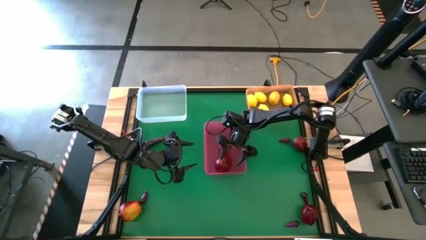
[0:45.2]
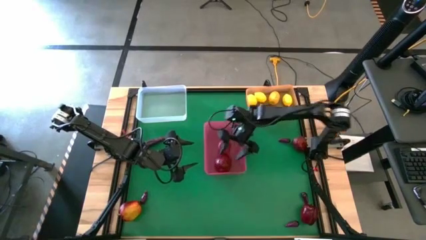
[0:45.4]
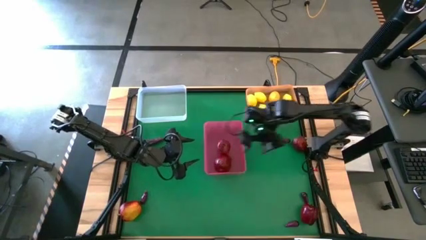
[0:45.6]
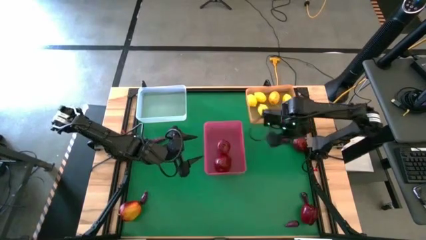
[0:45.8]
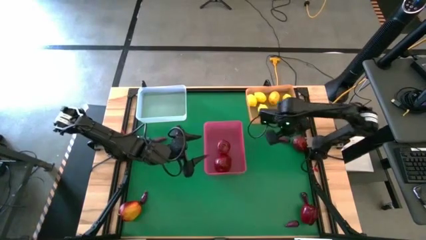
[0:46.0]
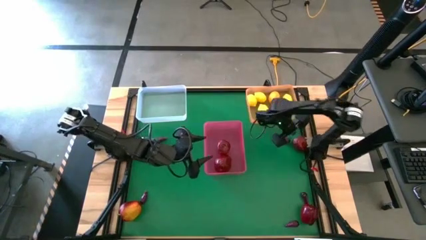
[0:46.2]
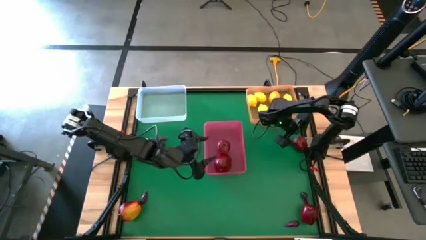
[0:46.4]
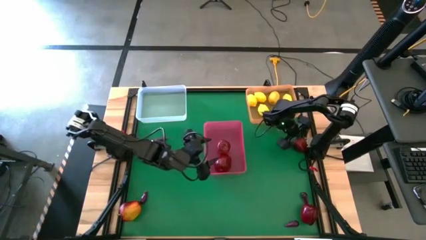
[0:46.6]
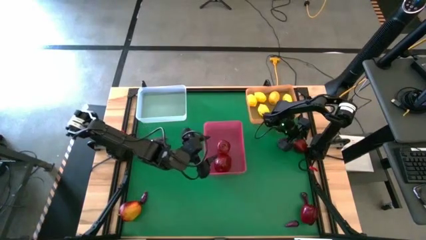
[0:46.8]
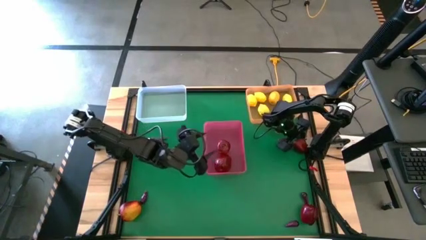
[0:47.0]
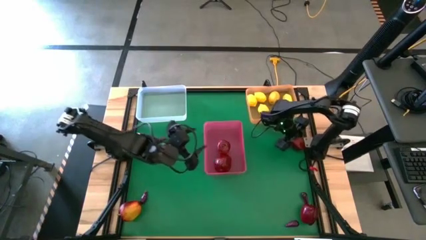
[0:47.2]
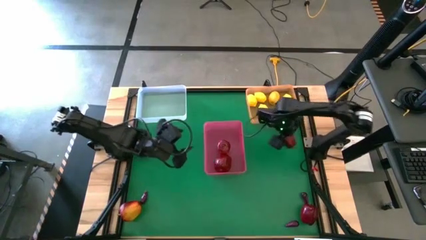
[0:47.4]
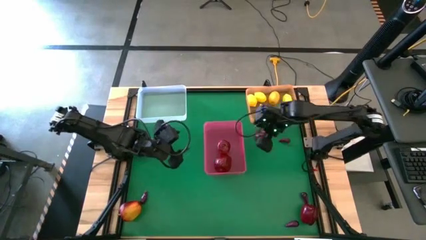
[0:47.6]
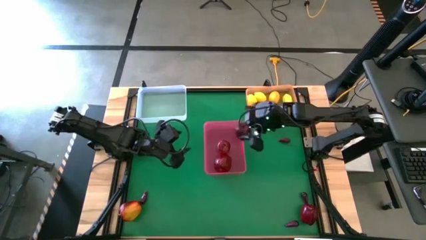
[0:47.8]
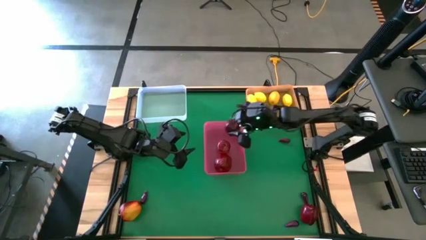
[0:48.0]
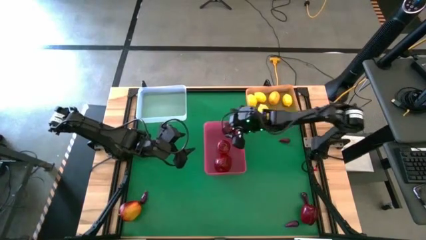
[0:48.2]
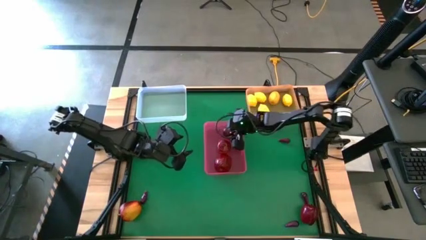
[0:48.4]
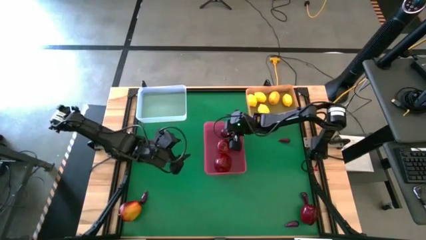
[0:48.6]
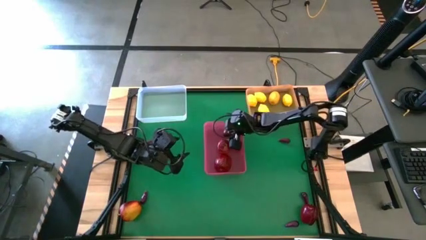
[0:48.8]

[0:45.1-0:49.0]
Task: Sort produce into baskets
Put the apple into the red bin

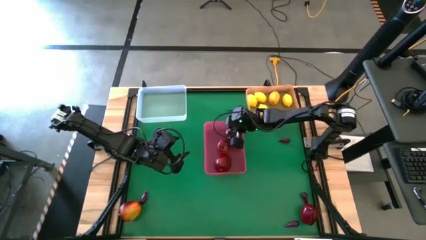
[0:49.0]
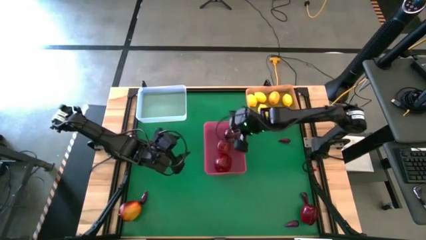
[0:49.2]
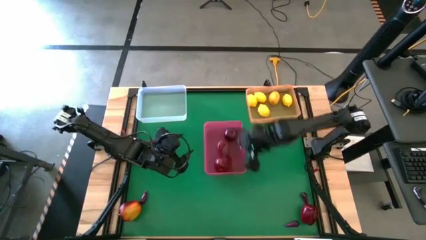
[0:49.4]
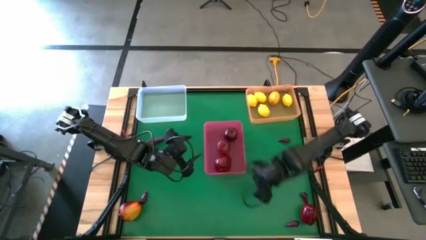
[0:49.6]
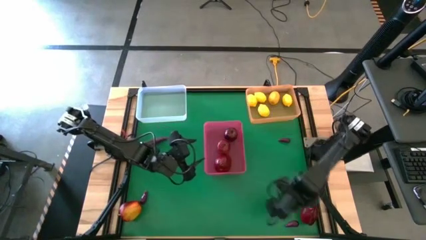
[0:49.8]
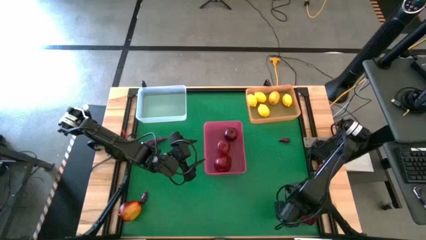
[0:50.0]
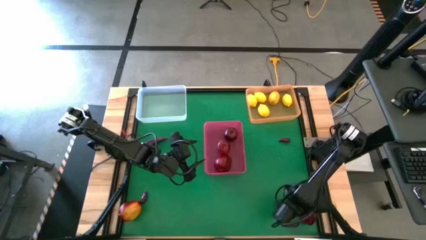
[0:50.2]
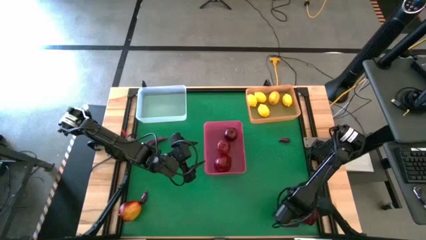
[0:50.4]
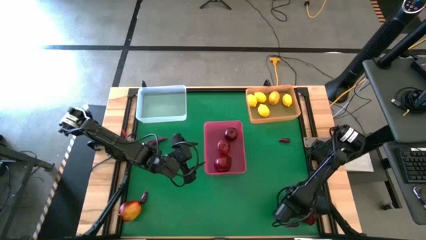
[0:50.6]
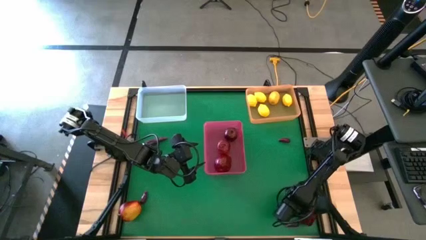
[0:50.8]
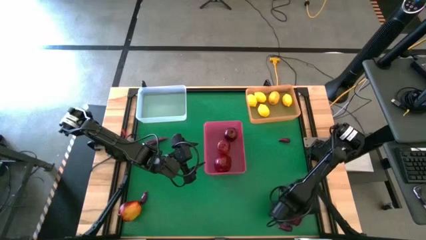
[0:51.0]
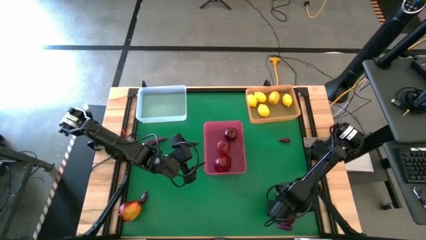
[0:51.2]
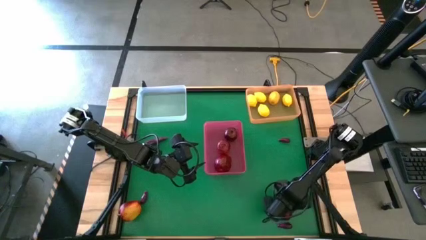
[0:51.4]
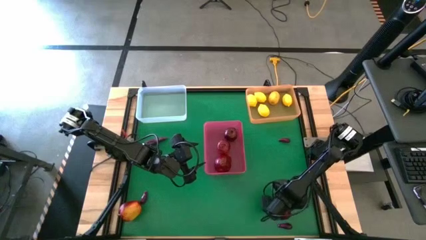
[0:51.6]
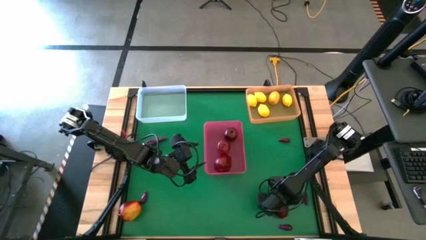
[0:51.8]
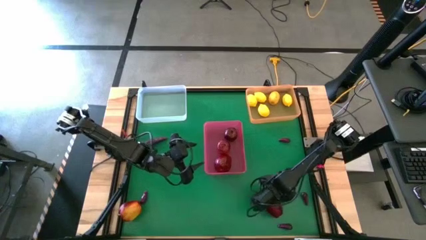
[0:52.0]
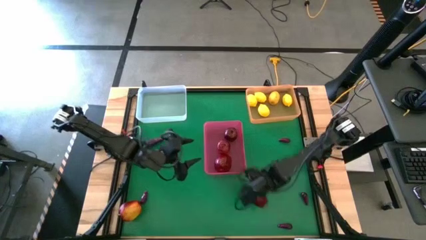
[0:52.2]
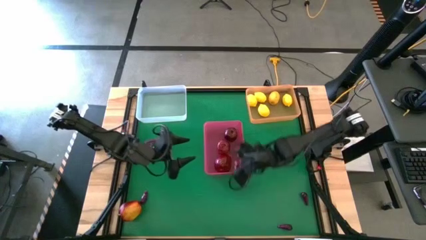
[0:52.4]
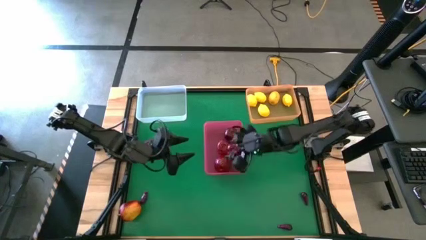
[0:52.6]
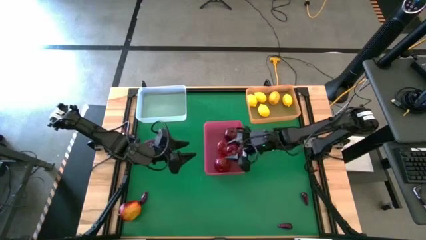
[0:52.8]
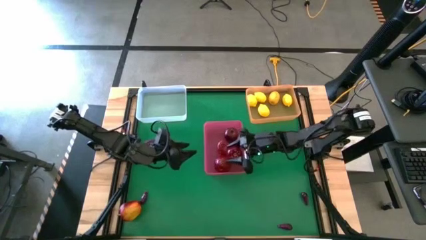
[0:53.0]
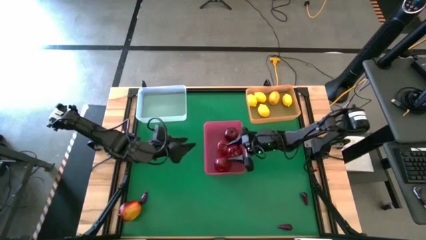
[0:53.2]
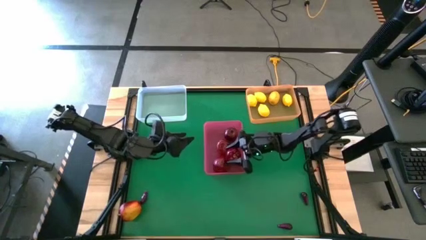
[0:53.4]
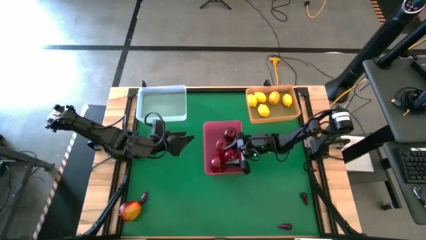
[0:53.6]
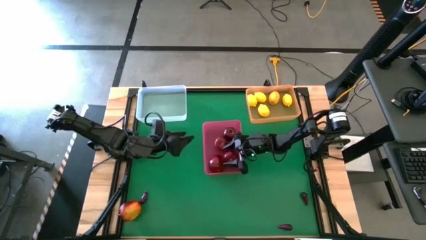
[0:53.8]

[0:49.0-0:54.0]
Put the apple into the red bin

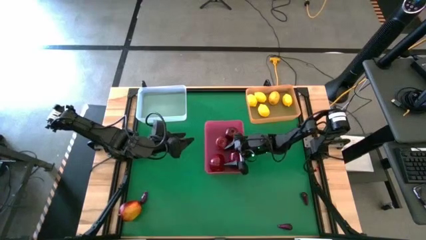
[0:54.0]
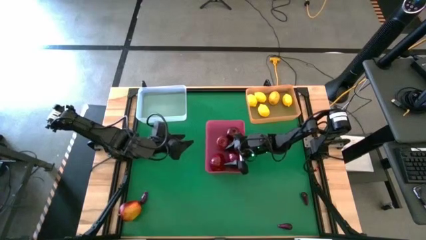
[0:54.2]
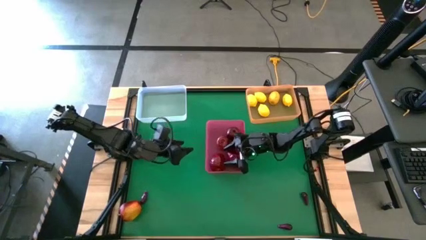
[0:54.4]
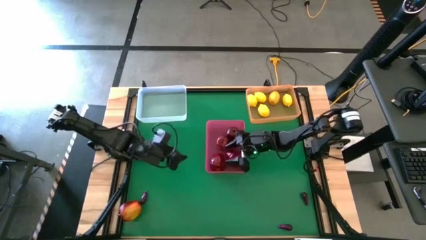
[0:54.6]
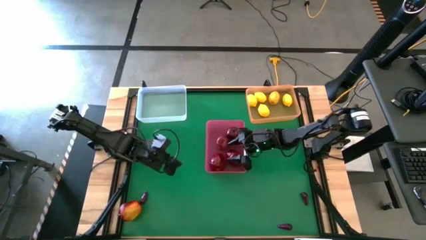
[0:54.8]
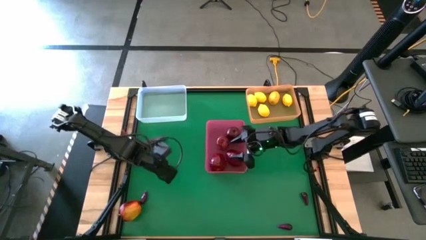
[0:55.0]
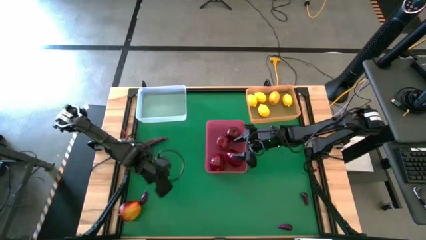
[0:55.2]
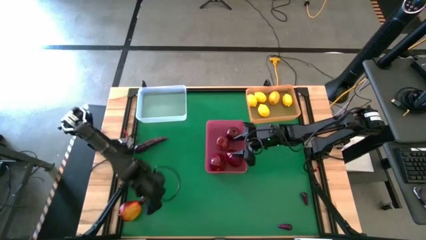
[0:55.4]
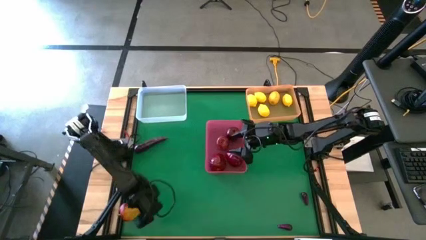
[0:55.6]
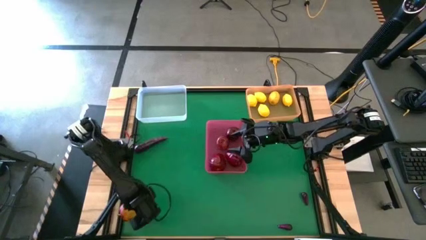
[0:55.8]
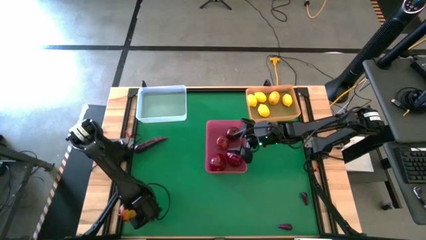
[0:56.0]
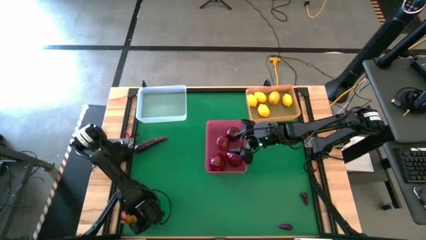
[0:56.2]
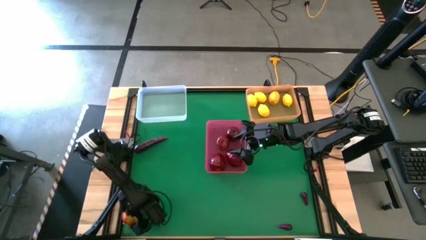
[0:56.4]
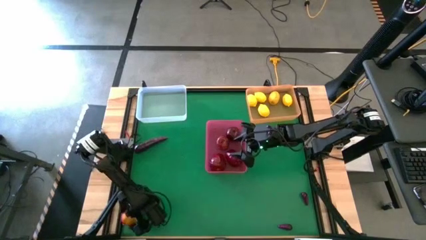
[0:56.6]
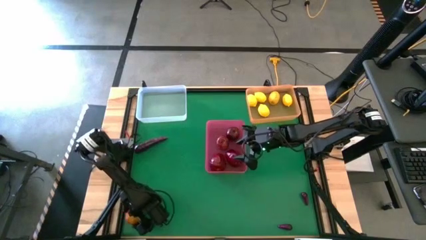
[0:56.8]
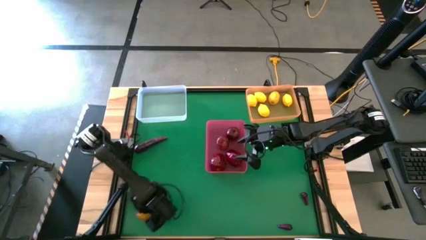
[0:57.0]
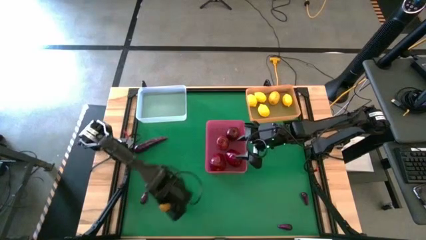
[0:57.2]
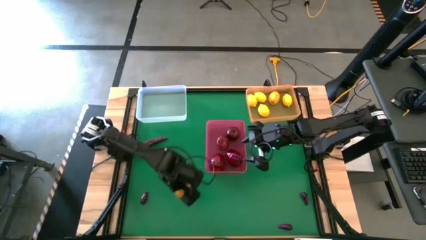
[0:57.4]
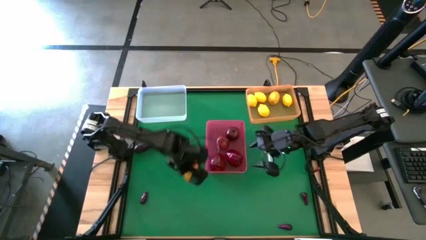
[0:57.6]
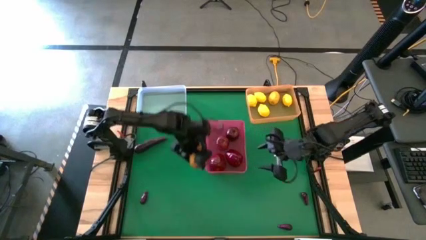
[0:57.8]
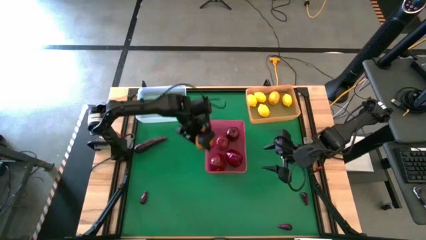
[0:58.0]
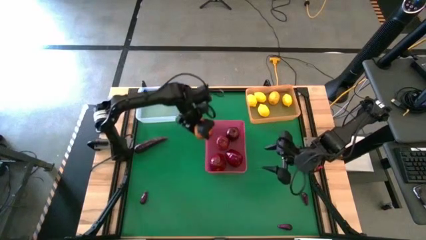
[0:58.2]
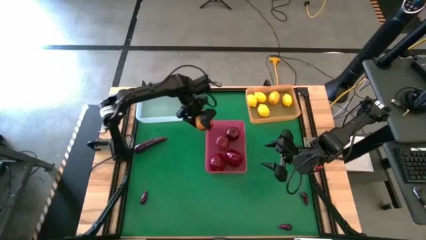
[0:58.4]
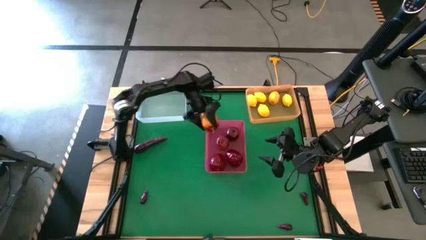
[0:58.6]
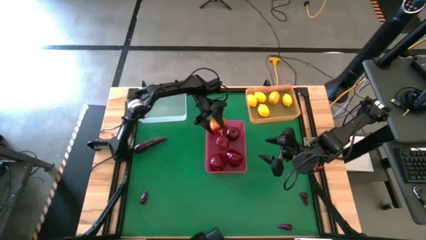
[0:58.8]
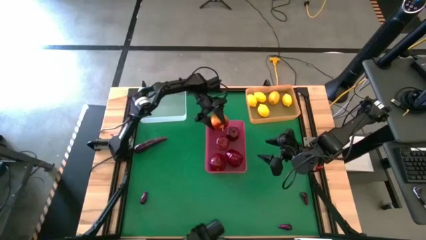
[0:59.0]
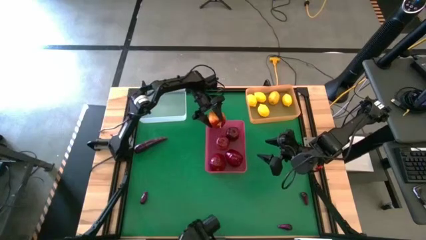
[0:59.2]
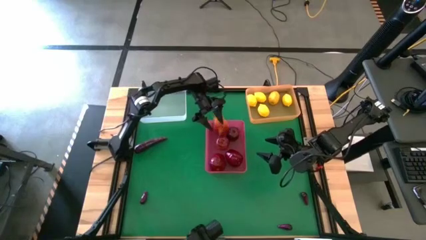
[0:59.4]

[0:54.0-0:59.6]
Put the apple into the red bin

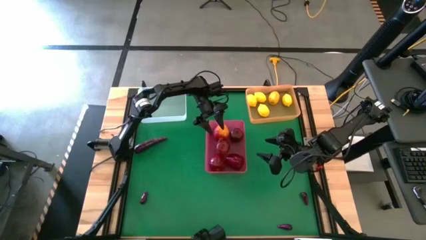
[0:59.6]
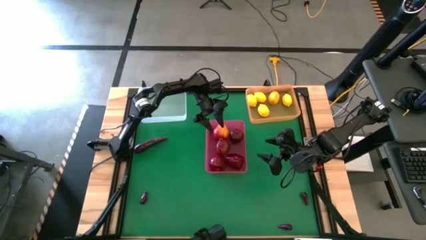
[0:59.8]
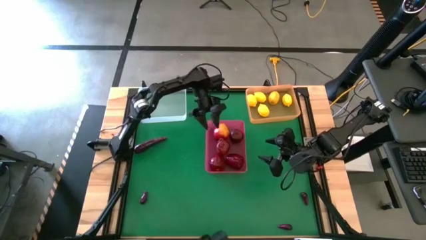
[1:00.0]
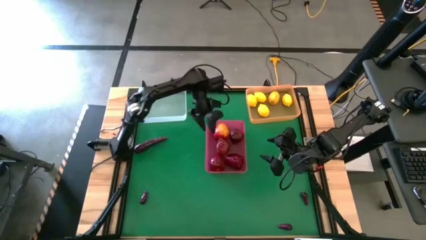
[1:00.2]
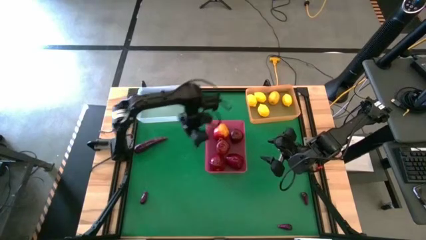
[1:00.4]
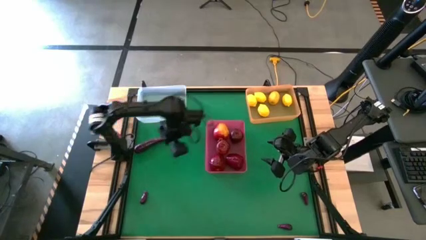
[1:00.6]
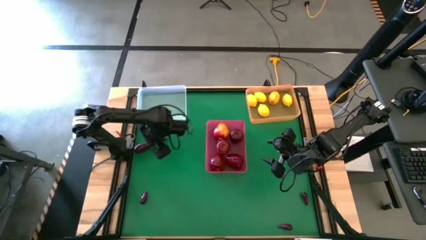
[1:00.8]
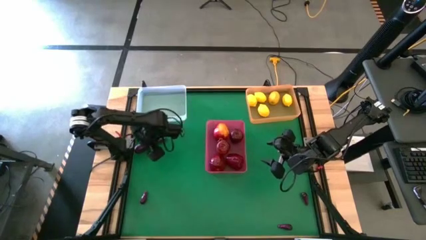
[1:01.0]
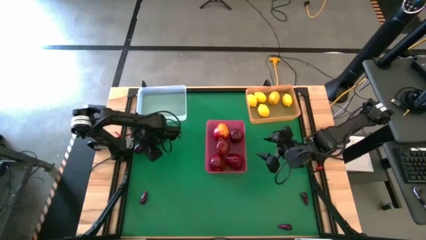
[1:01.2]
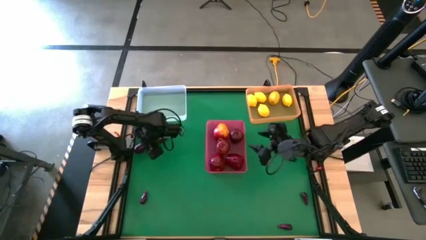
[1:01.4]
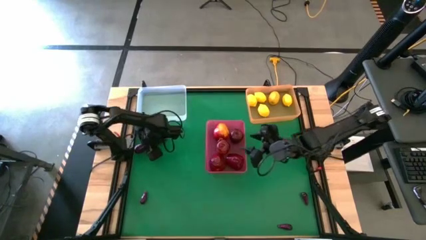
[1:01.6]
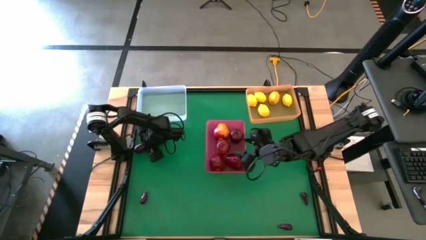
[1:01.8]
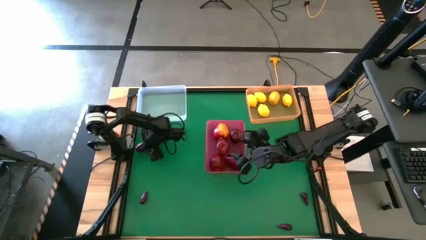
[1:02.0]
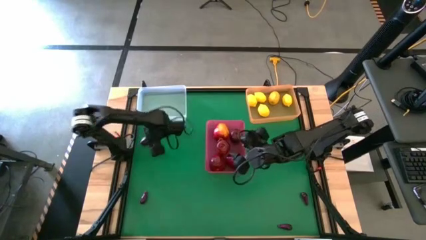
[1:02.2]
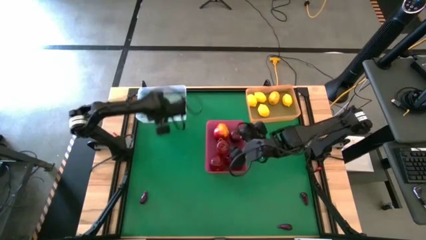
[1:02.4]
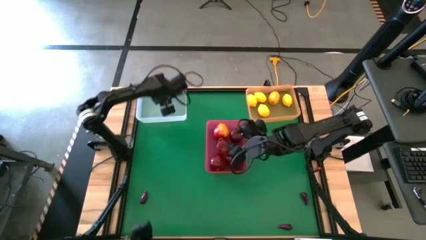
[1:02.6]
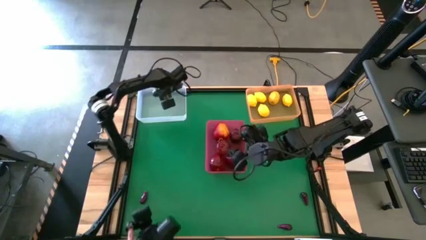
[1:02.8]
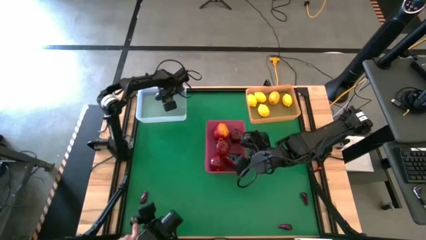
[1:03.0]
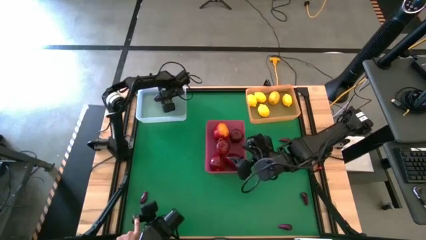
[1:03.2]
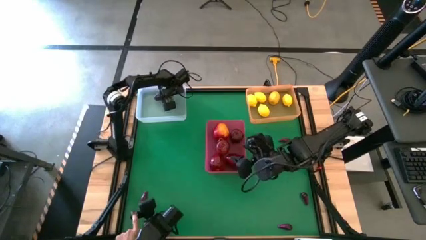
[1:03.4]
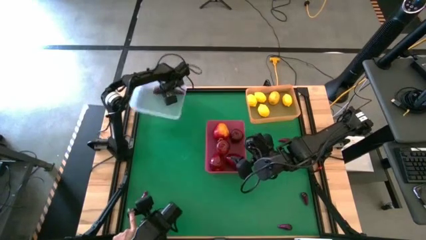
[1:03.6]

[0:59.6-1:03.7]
Put the eggplant into the white bin
